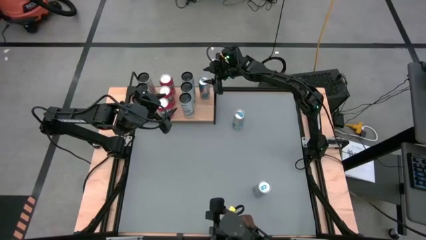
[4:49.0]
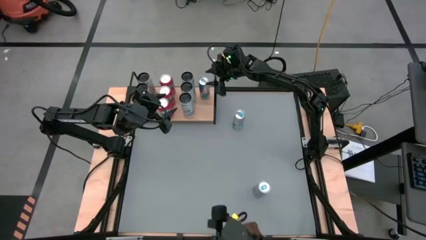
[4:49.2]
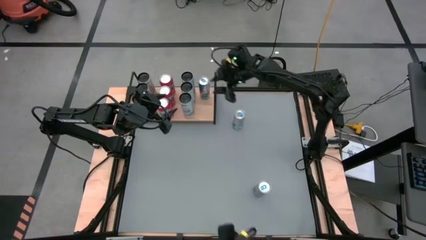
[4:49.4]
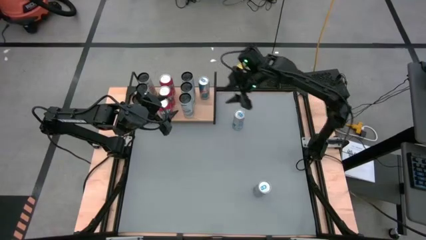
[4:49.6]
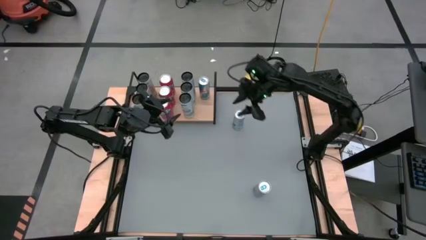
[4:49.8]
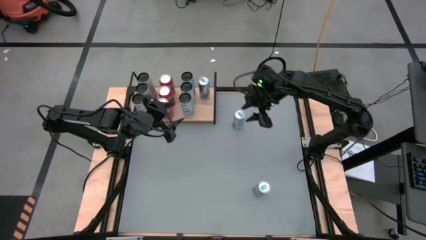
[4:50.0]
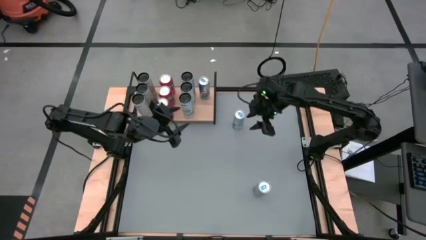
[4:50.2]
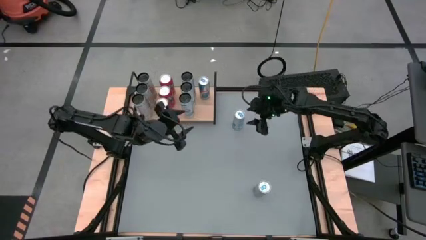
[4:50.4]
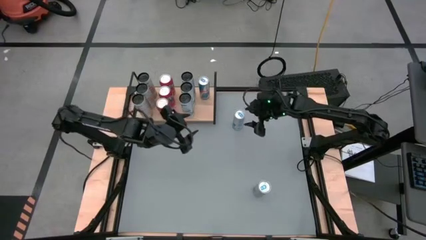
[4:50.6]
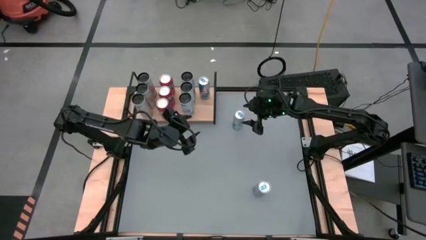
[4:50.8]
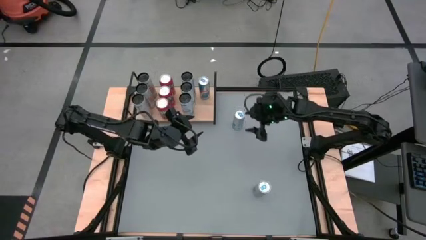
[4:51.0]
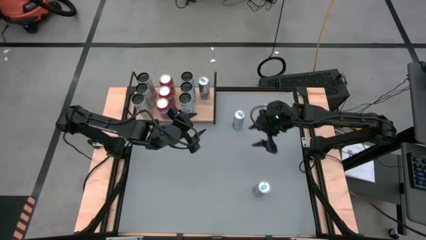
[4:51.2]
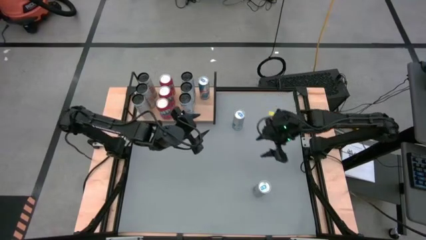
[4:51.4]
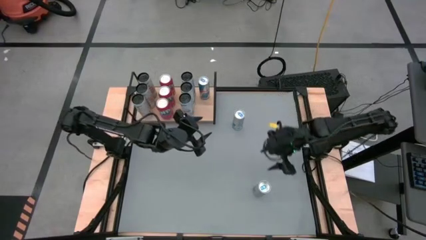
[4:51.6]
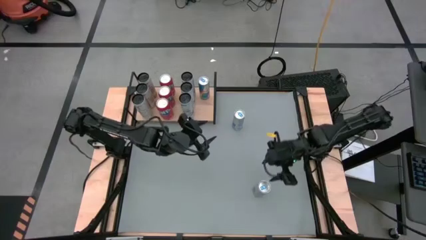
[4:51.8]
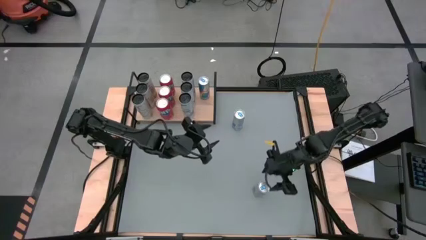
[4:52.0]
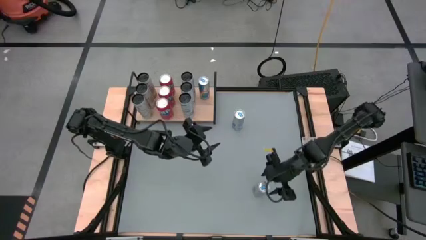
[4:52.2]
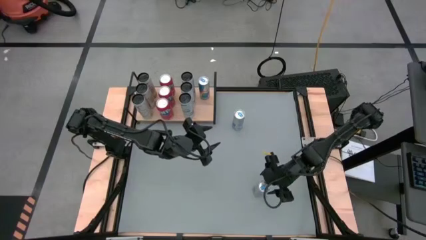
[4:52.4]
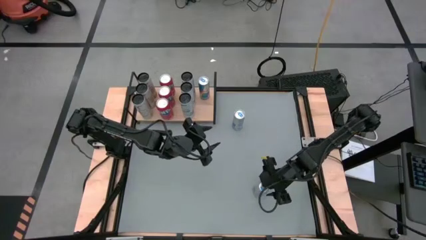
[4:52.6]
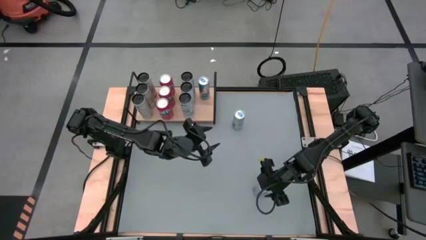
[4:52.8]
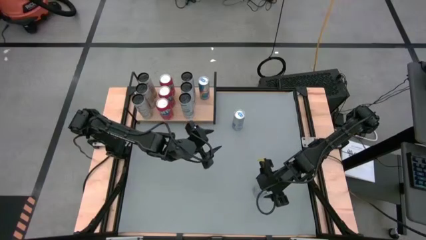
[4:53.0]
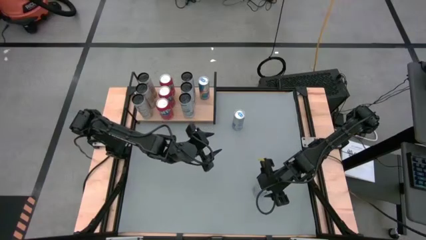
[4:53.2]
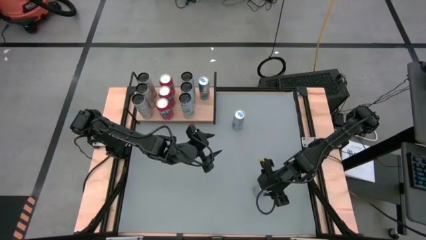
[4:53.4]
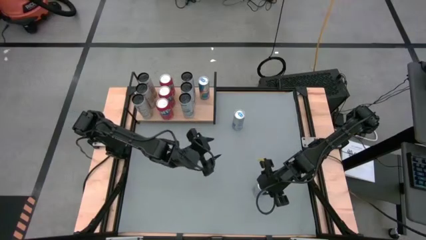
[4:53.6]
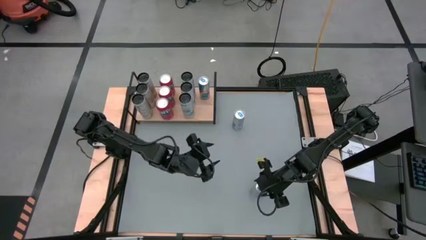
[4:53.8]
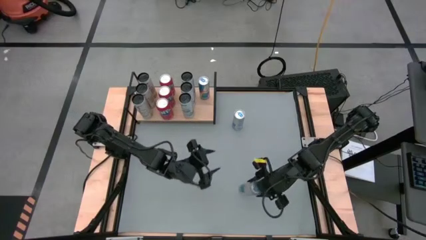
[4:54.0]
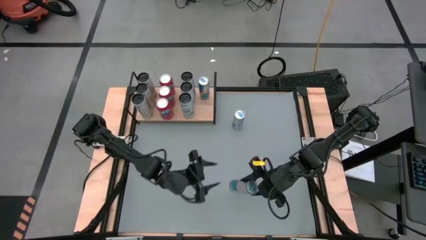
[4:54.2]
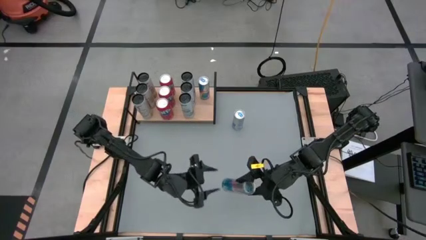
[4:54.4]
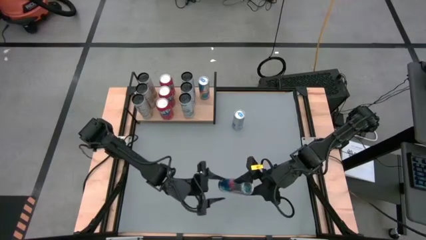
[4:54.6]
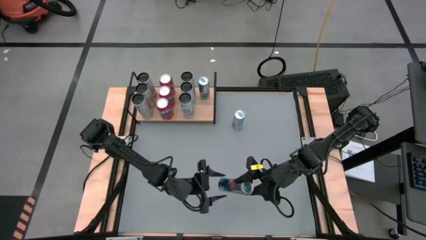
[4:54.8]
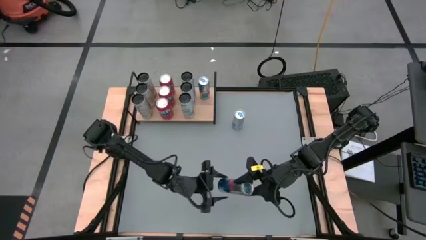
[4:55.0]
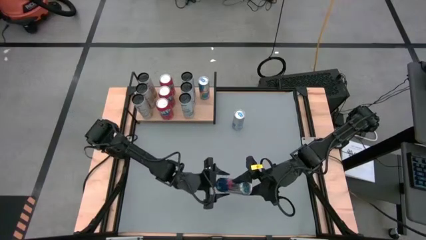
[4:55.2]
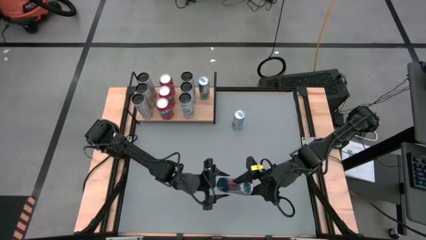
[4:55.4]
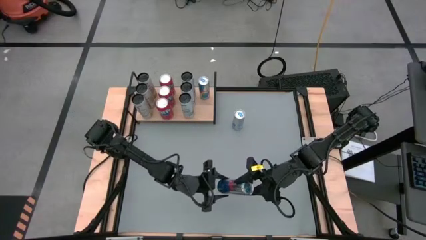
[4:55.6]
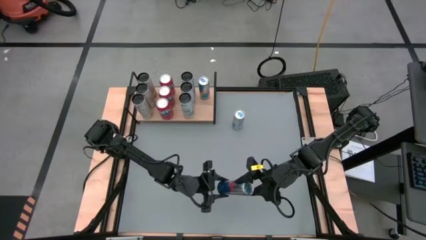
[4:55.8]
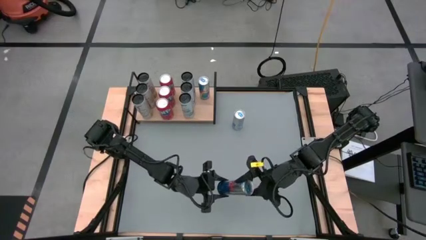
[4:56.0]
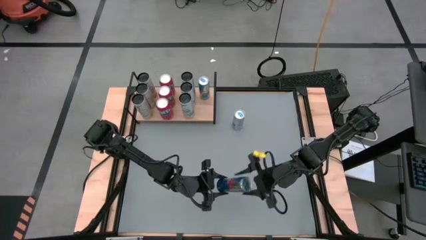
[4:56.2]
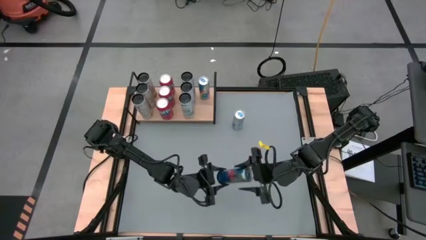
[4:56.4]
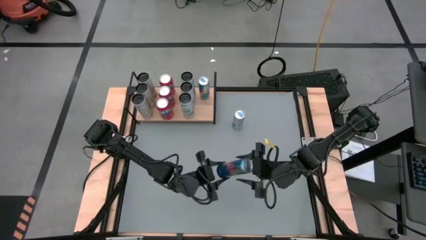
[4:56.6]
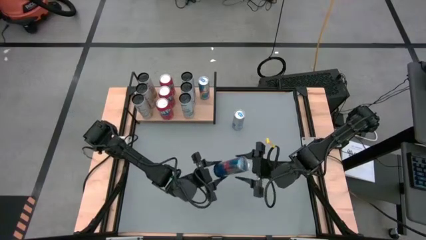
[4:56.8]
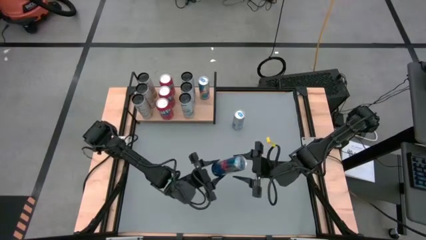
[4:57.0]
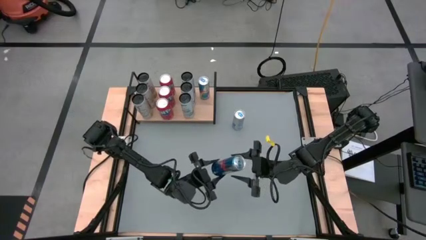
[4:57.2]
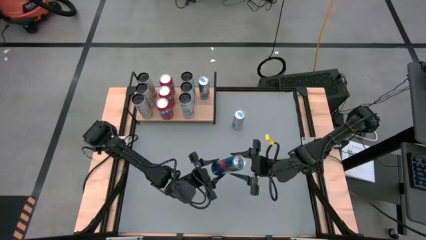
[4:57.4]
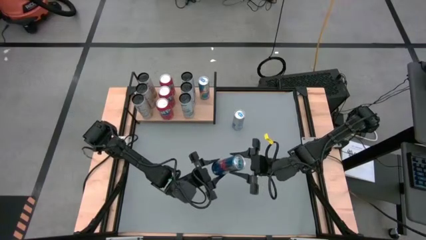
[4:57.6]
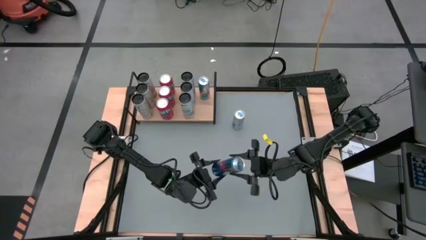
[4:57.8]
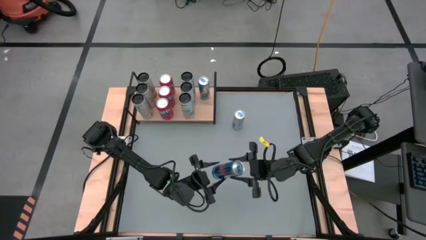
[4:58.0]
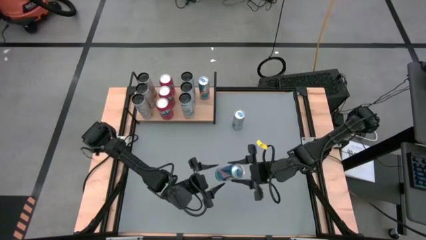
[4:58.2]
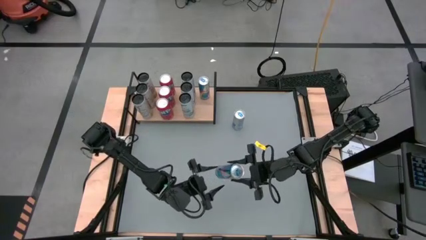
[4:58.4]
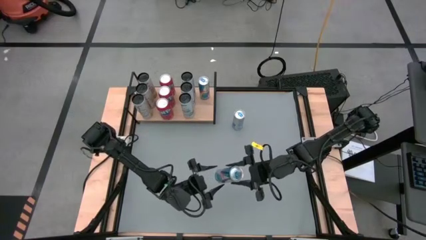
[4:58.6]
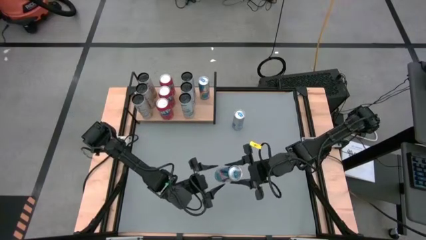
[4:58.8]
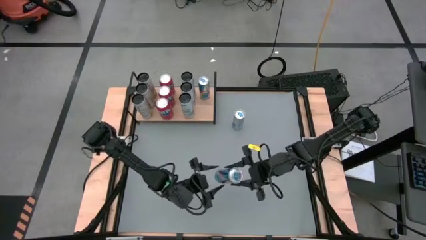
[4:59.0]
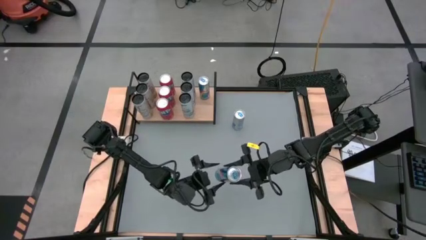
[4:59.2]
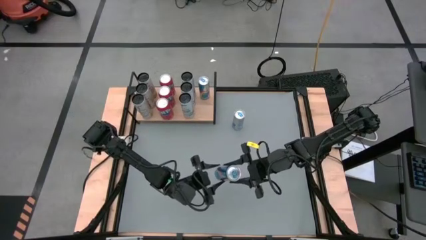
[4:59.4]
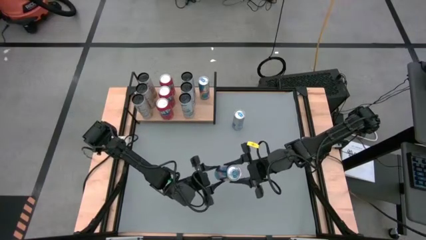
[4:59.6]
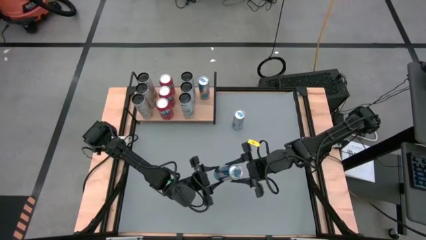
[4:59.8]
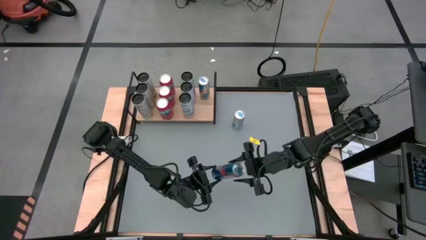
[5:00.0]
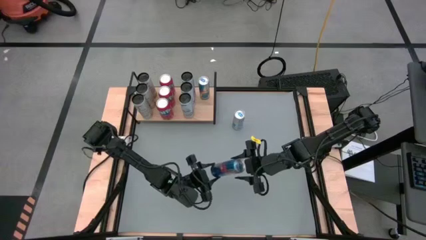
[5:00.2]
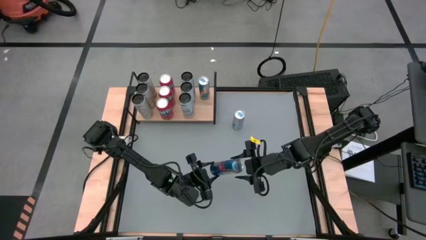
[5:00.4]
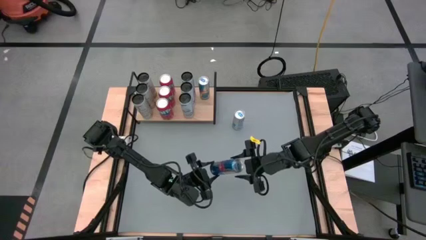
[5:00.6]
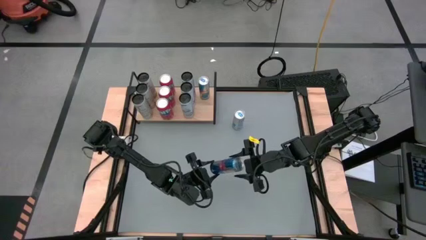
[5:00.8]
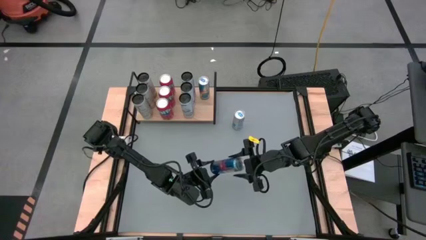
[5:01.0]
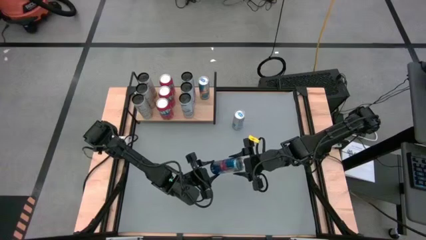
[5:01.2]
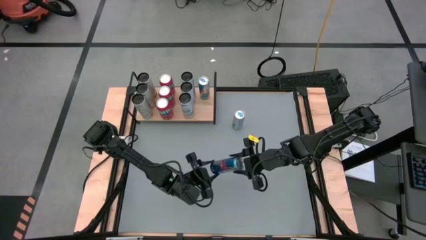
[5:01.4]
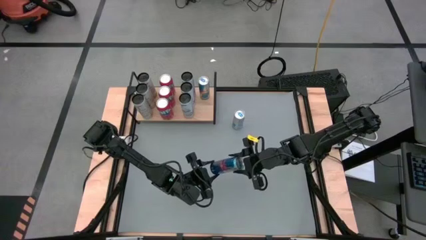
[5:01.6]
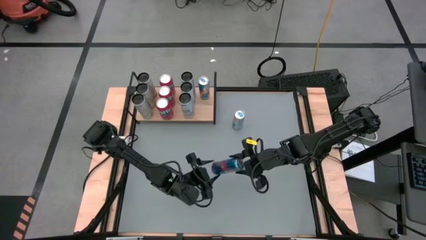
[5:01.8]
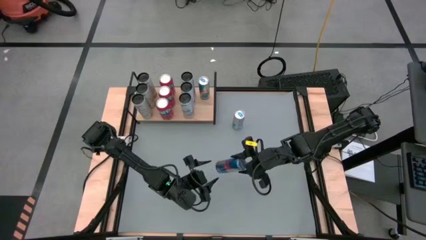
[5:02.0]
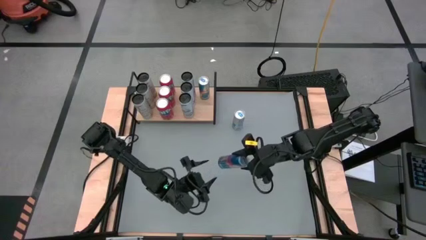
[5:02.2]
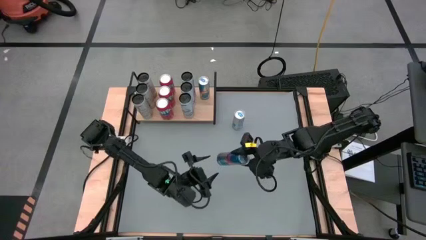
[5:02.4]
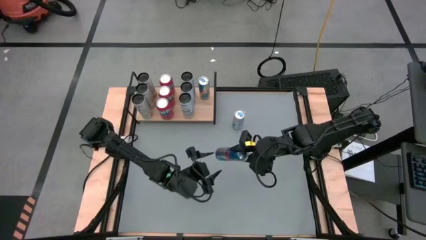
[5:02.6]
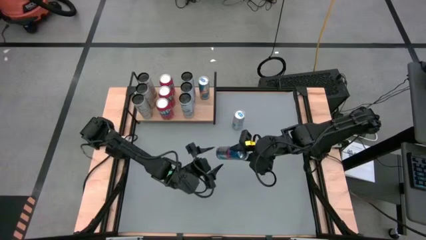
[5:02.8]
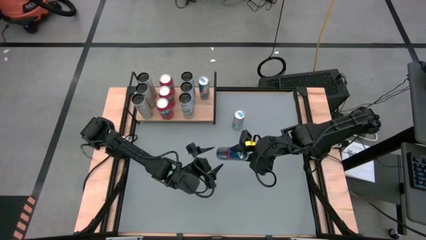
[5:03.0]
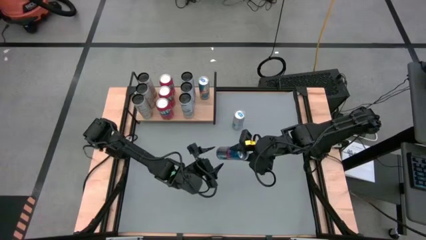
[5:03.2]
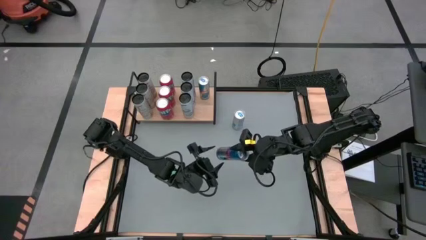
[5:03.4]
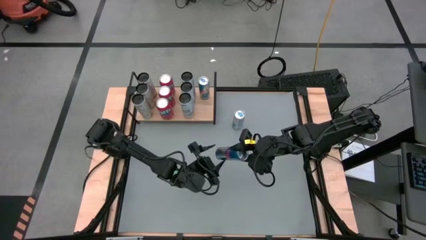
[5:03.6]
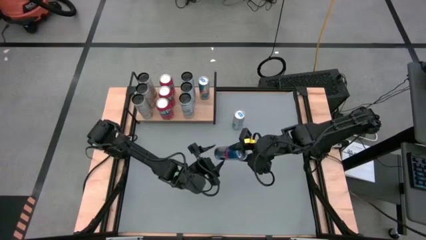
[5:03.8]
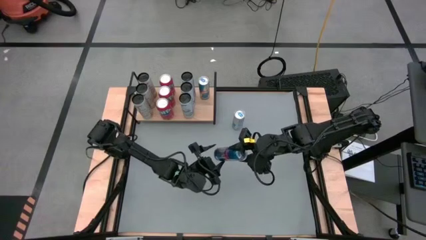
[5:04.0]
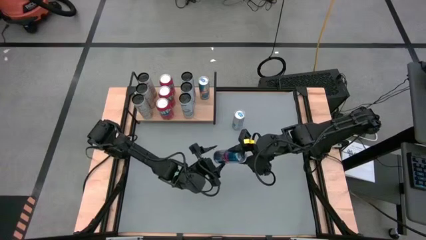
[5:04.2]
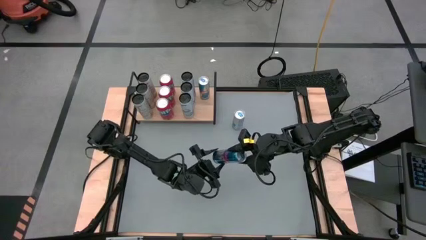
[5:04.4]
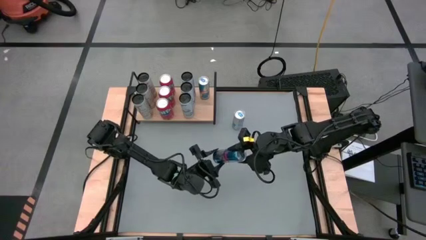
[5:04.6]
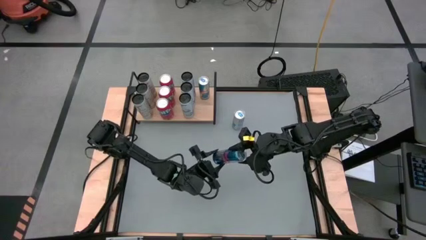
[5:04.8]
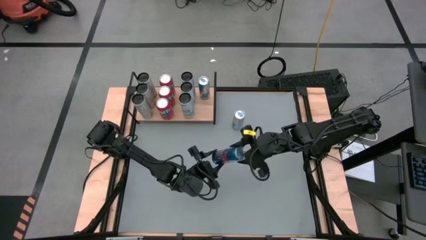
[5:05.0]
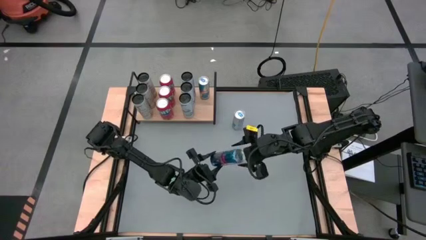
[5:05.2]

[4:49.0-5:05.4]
Task: Place canned beverage on shelf
Put the bottom blue soda can on the shelf aligned with the other blue soda can
